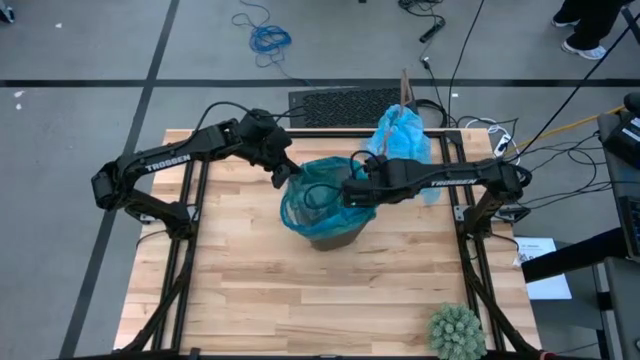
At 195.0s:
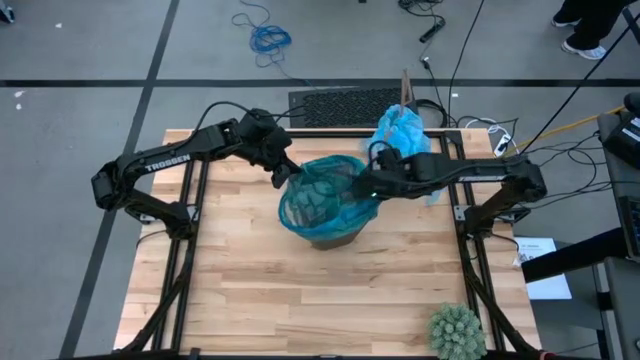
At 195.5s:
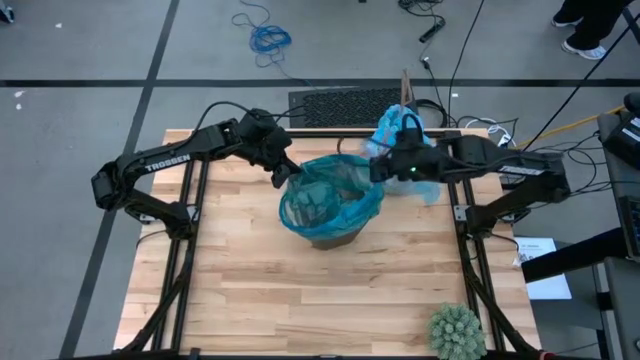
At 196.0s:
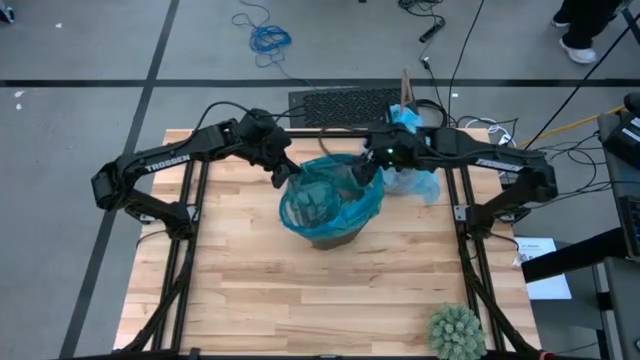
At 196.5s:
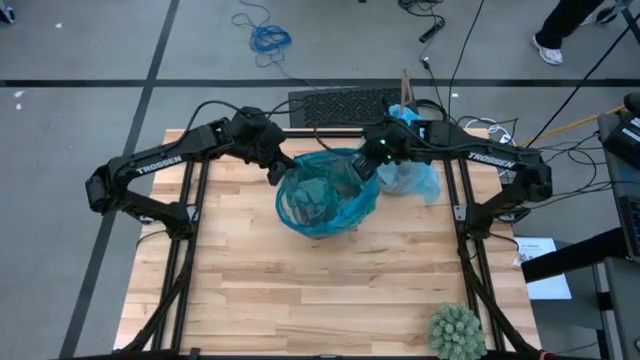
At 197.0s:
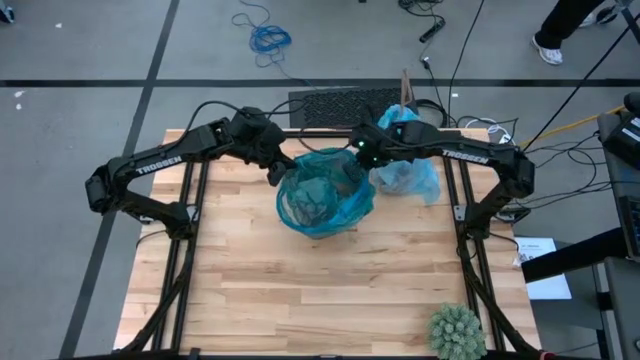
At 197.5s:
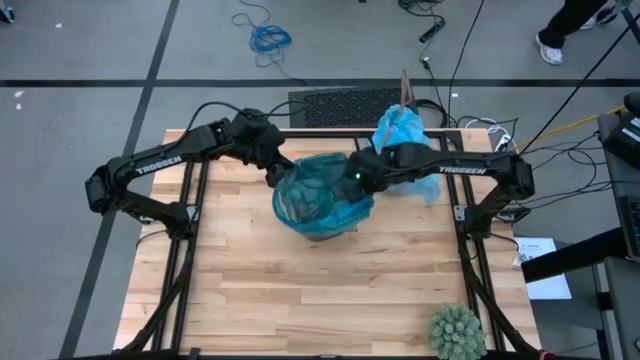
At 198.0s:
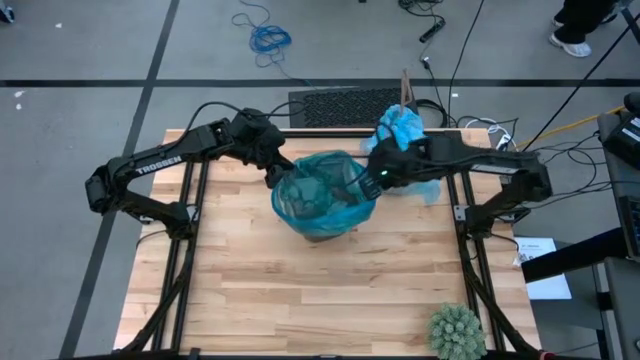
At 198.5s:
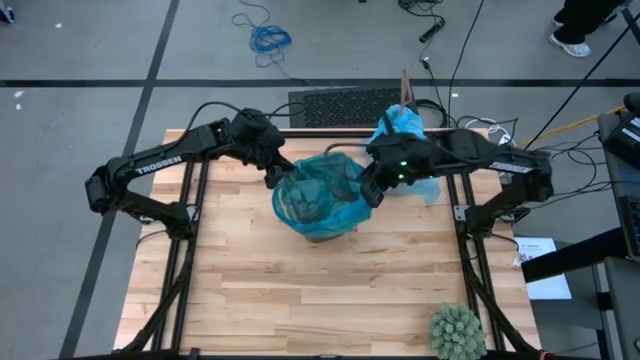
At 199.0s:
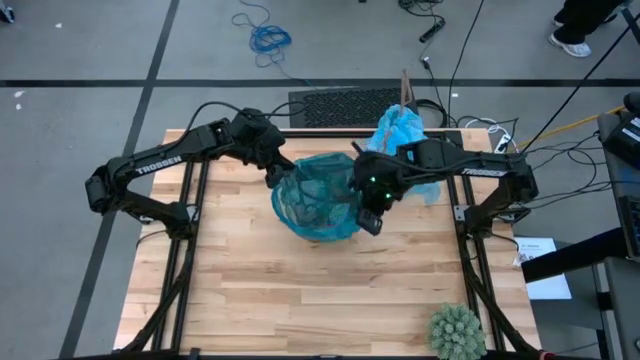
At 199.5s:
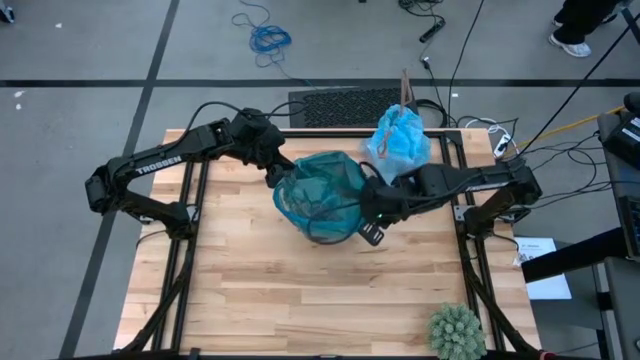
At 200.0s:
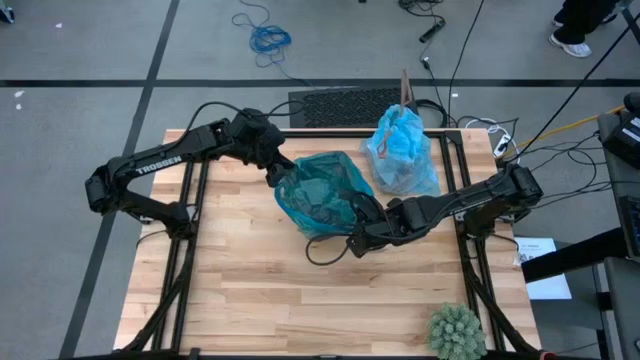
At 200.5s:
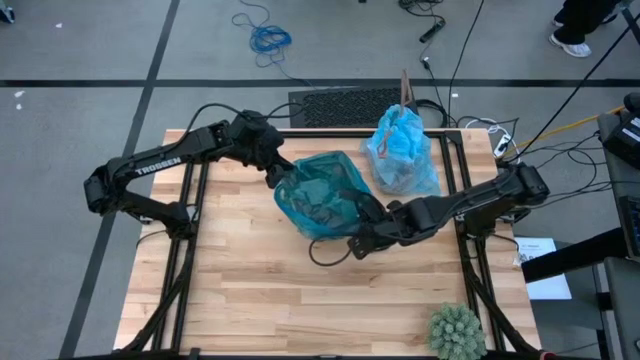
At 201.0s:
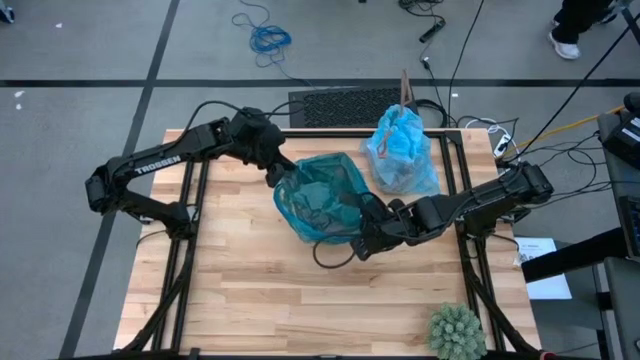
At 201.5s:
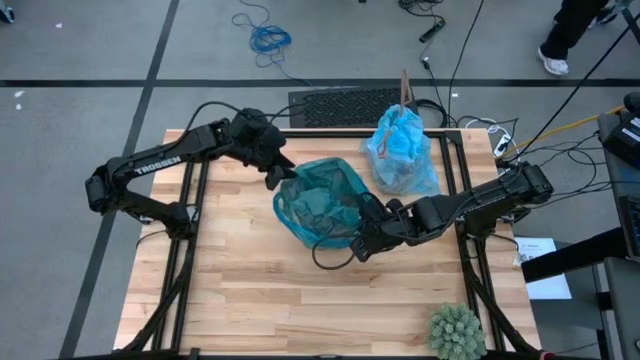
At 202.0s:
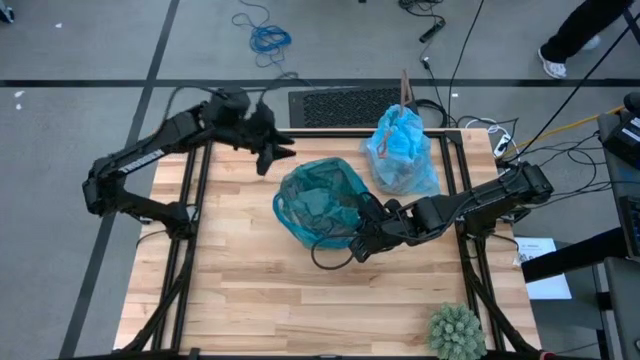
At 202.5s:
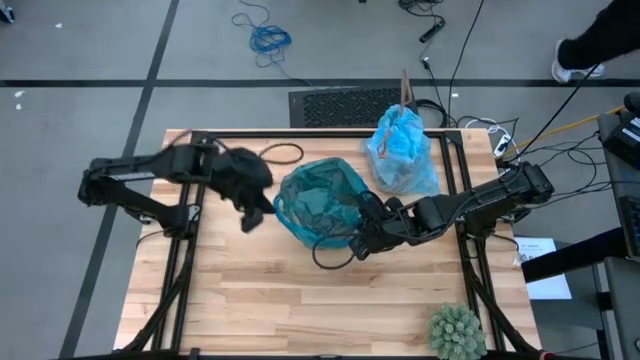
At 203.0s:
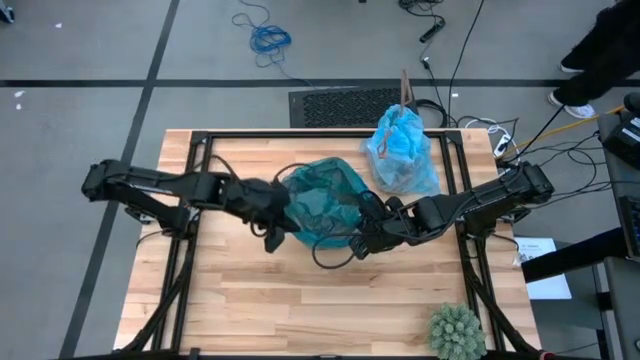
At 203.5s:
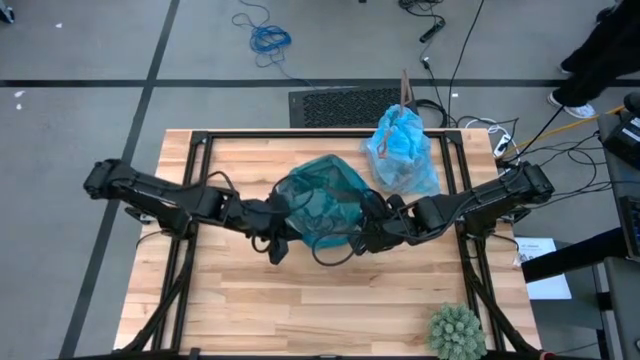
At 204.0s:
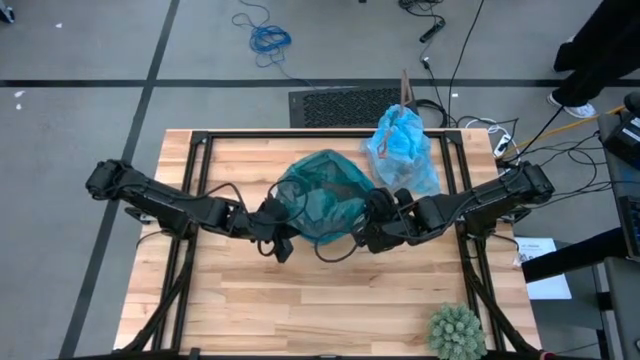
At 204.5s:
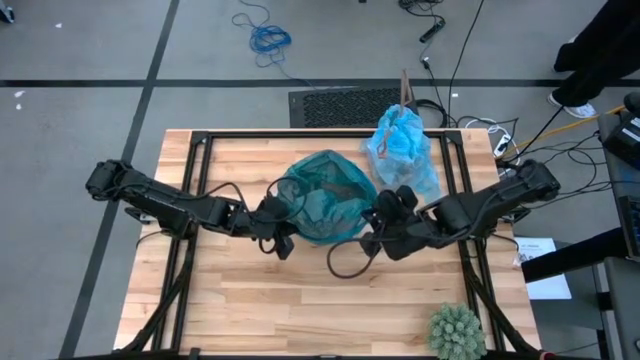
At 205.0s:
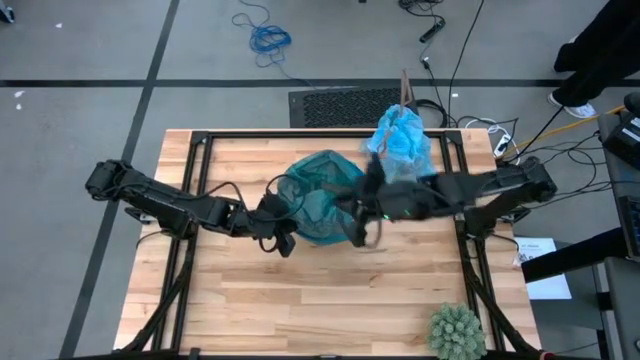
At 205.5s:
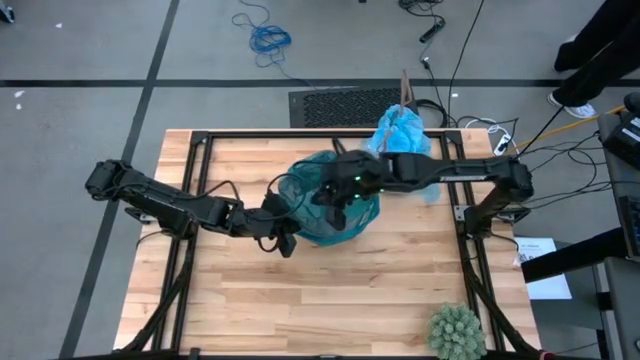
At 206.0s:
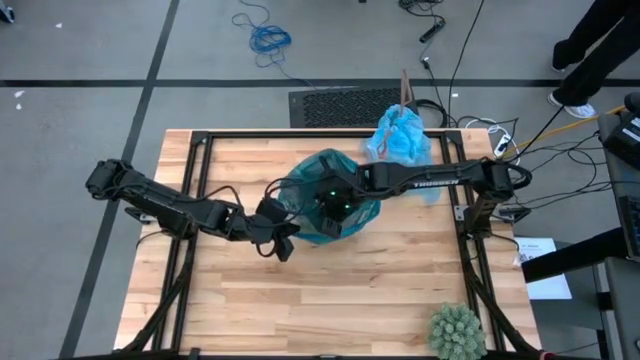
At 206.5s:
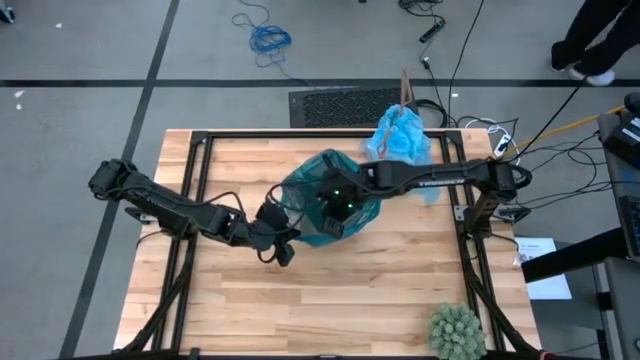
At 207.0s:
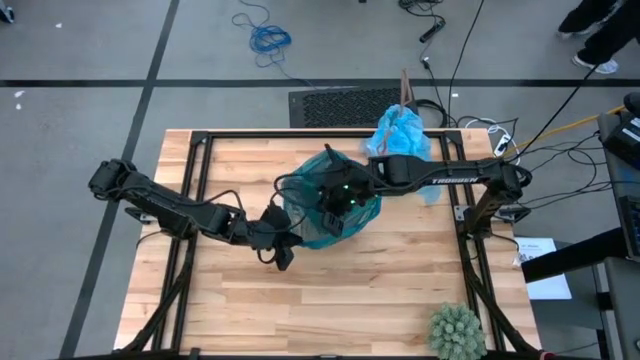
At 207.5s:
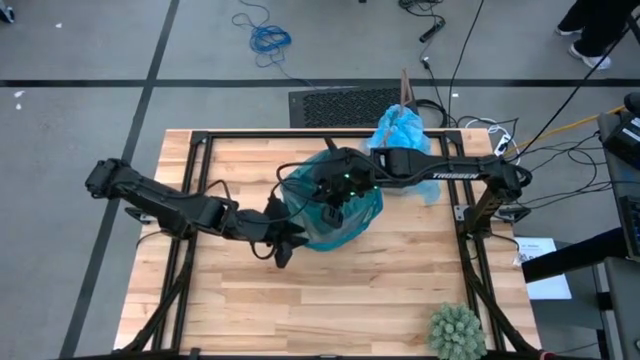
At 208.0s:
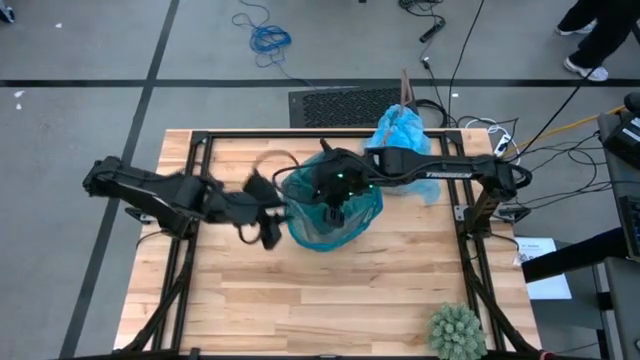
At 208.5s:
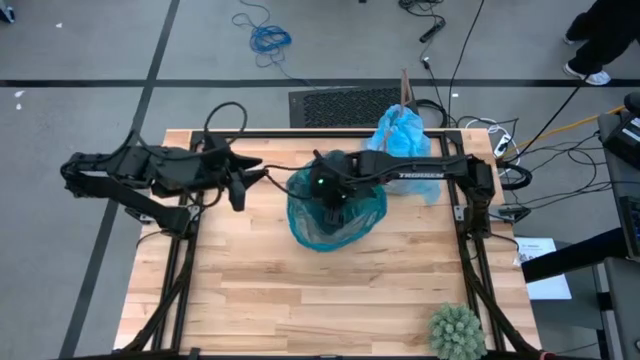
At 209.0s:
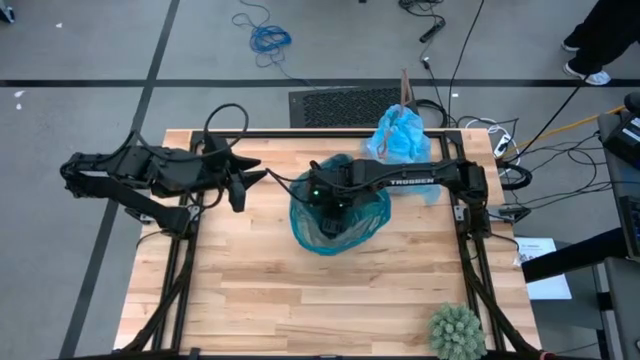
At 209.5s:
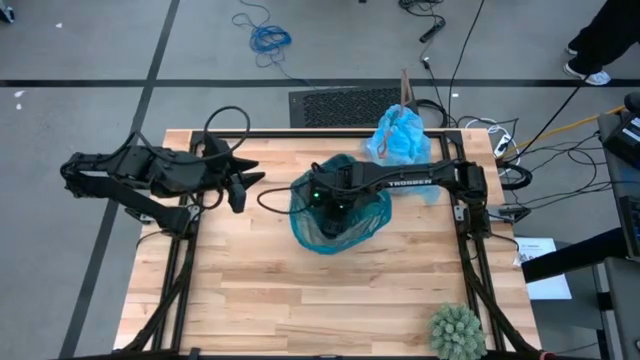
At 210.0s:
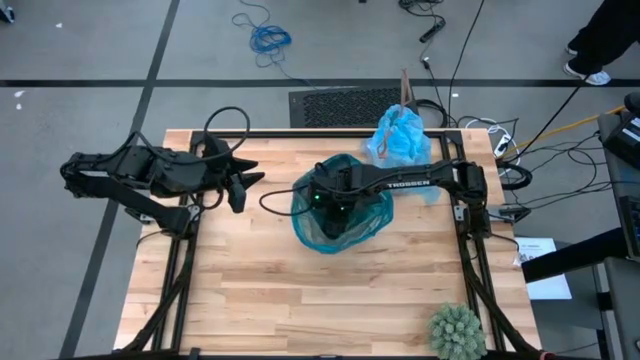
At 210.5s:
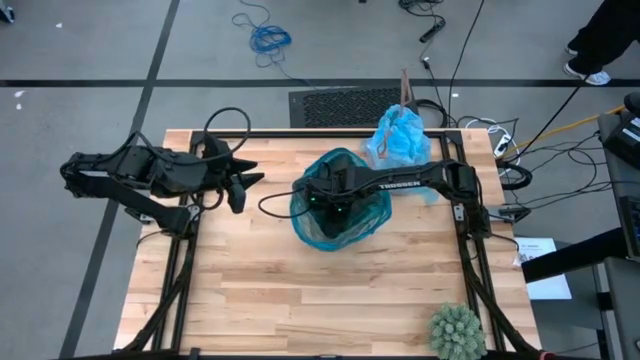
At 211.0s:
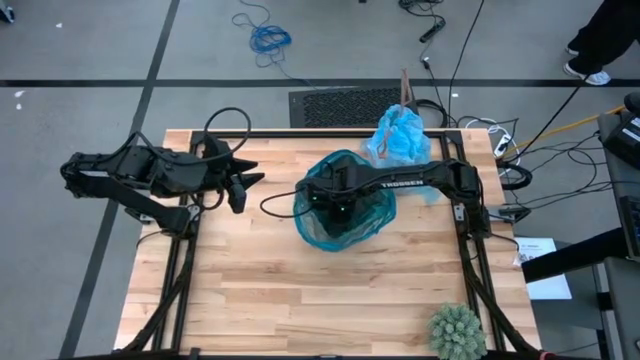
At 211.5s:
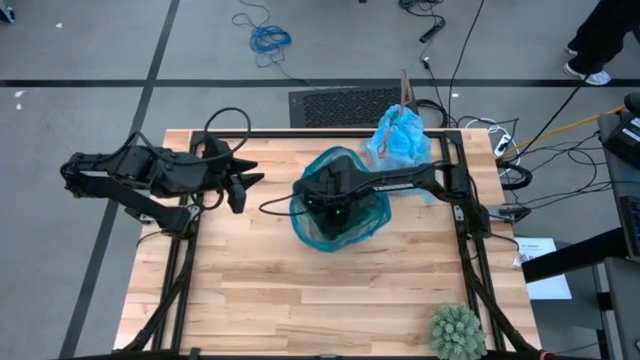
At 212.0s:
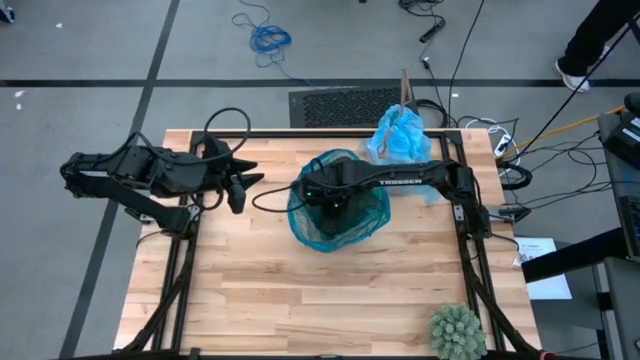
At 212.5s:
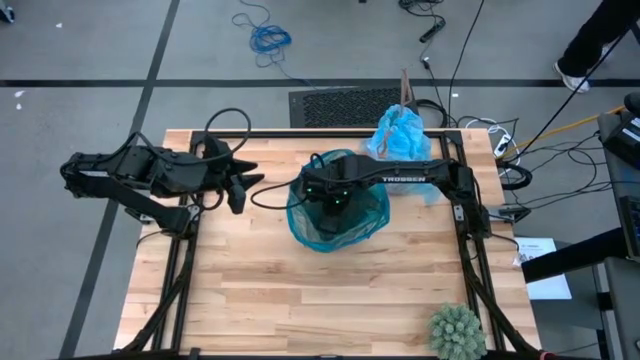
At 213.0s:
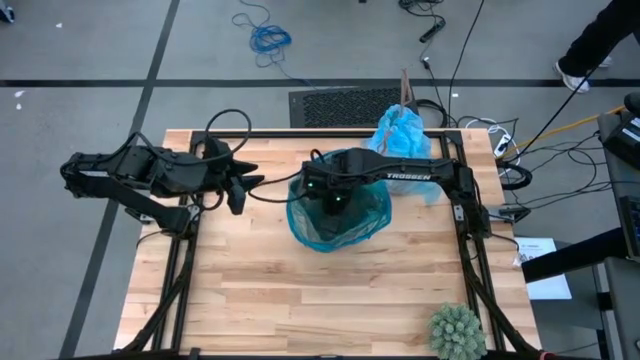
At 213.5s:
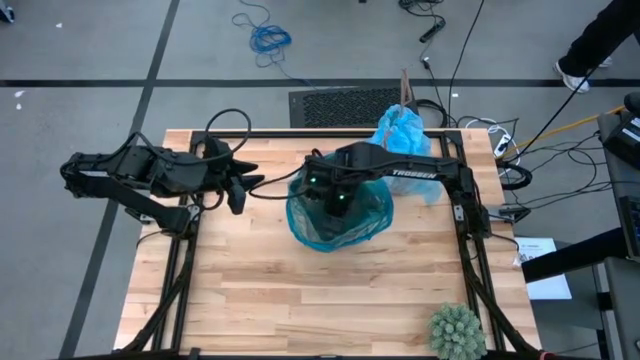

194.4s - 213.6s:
Task: place trash/remove bag and relplace
Insert the dark blue trash bag into the trash bin

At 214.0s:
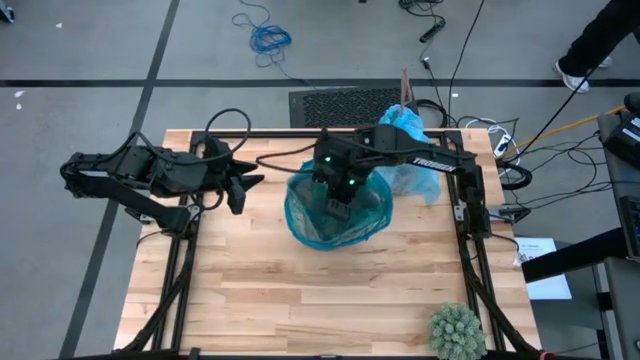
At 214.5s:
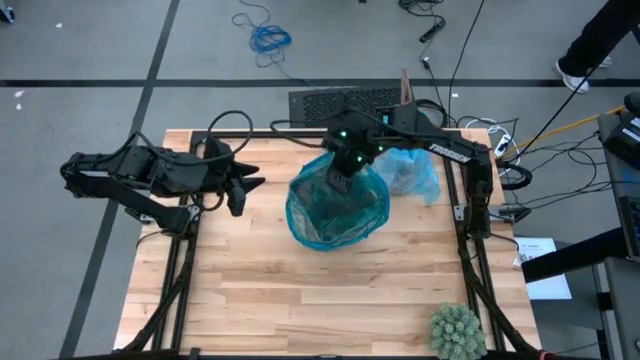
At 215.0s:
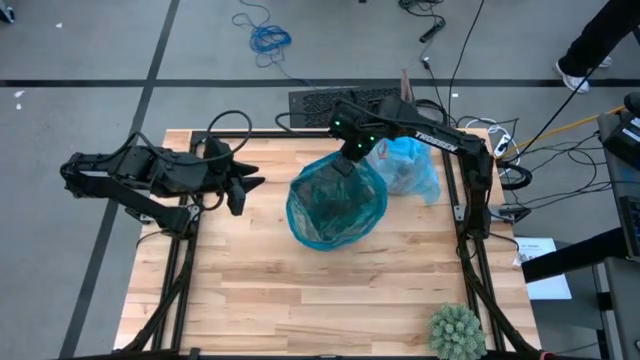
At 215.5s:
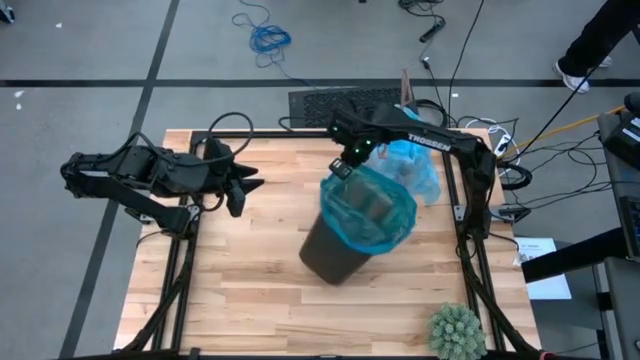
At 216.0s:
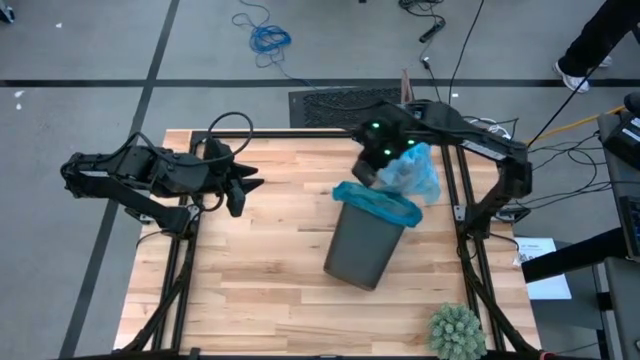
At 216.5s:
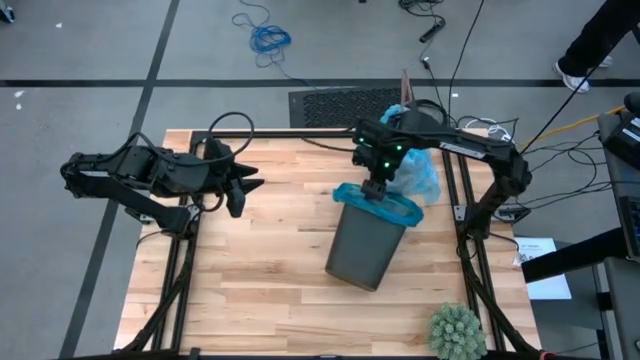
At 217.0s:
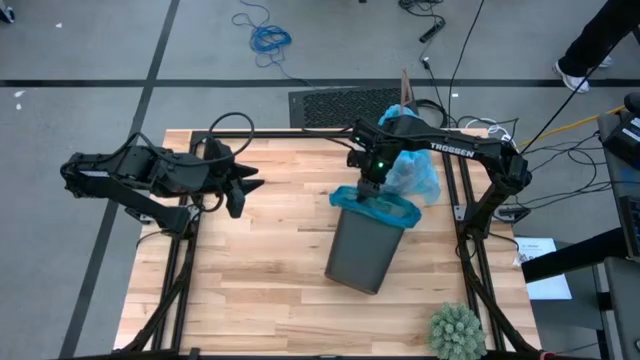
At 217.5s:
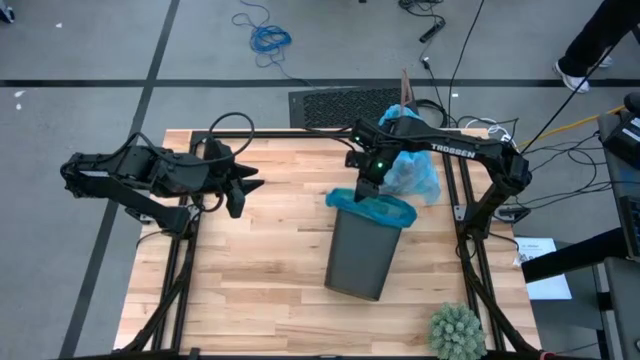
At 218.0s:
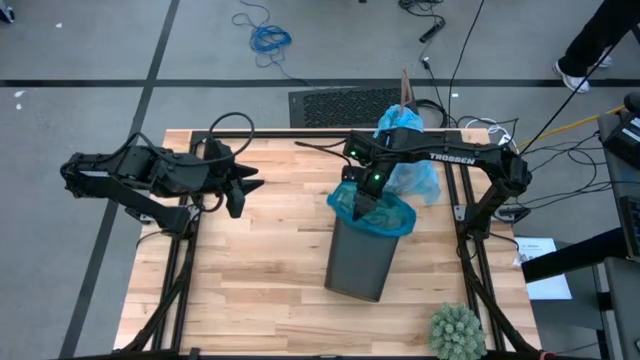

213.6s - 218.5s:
Insert the dark blue trash bag into the trash bin
